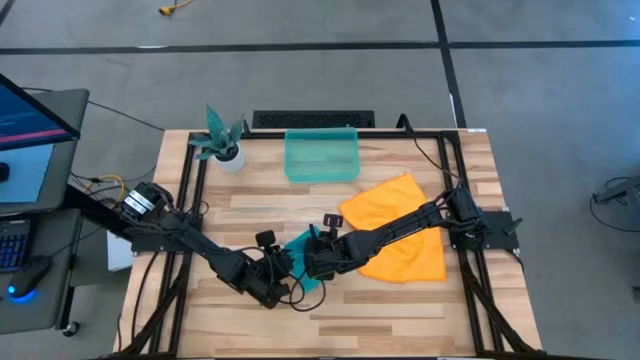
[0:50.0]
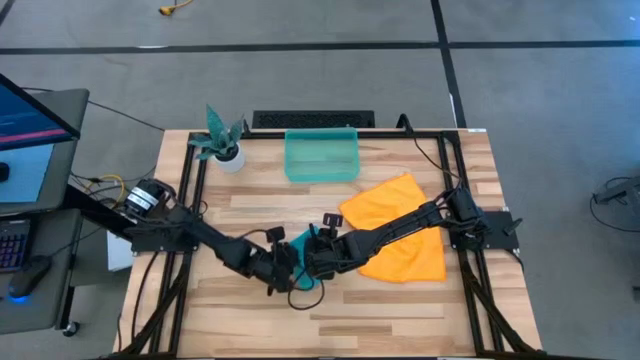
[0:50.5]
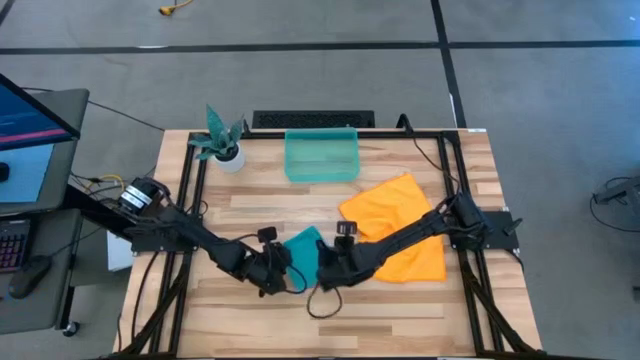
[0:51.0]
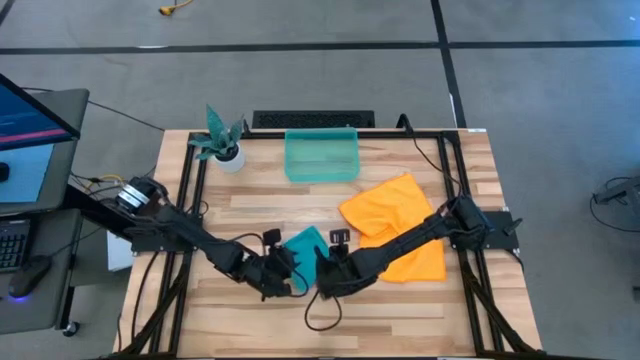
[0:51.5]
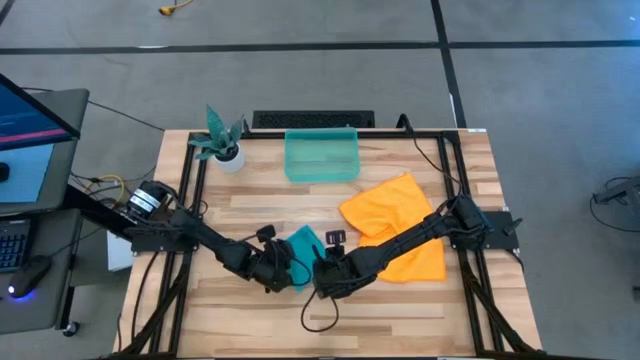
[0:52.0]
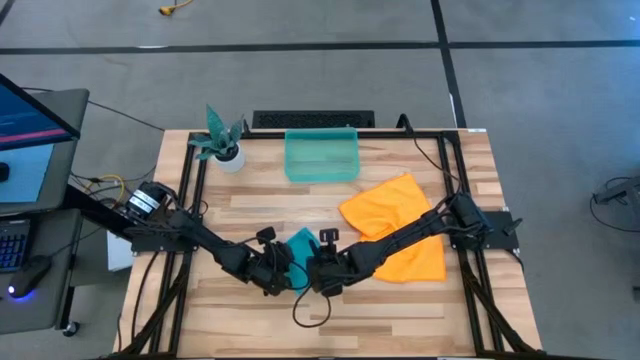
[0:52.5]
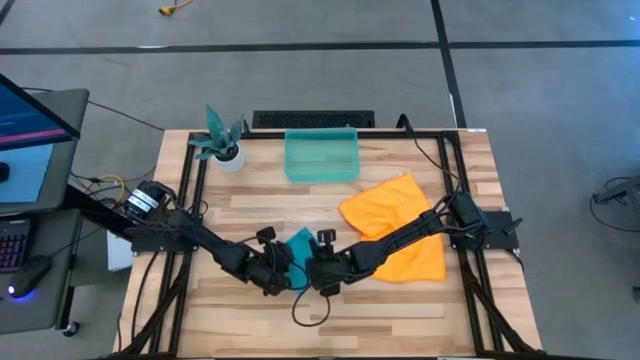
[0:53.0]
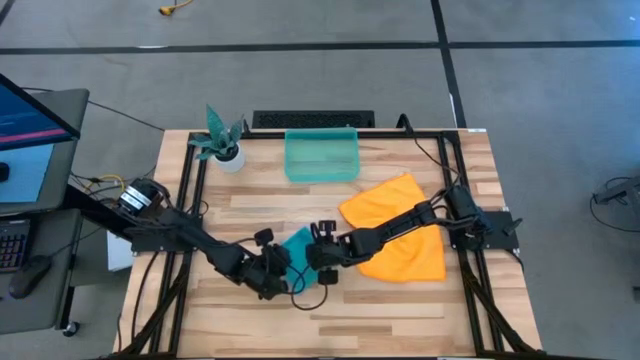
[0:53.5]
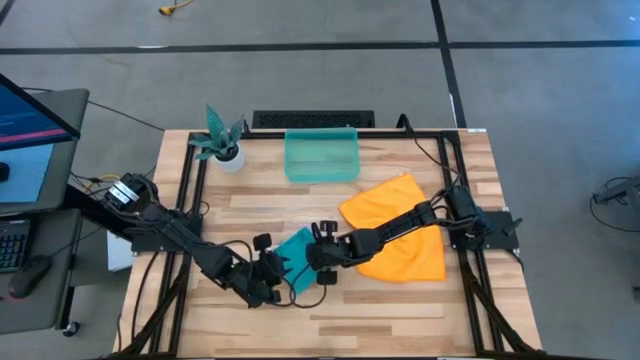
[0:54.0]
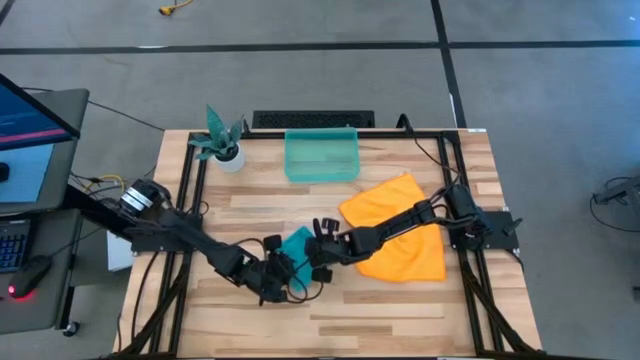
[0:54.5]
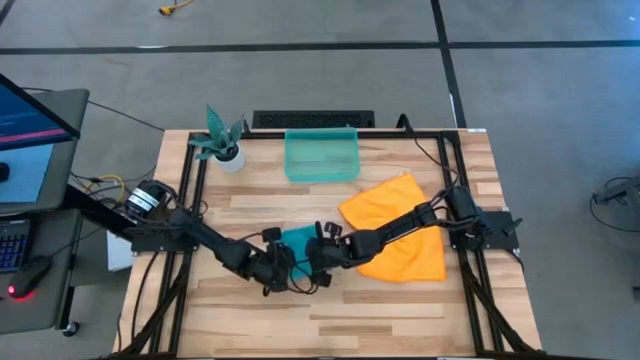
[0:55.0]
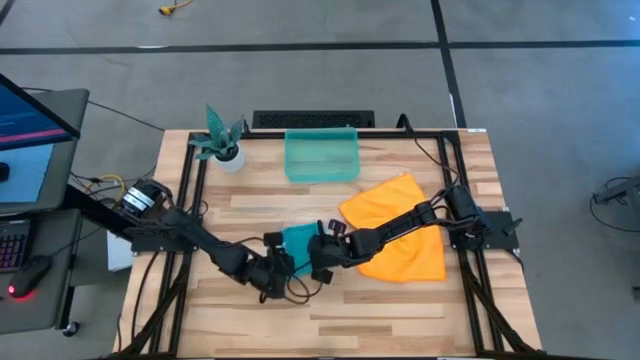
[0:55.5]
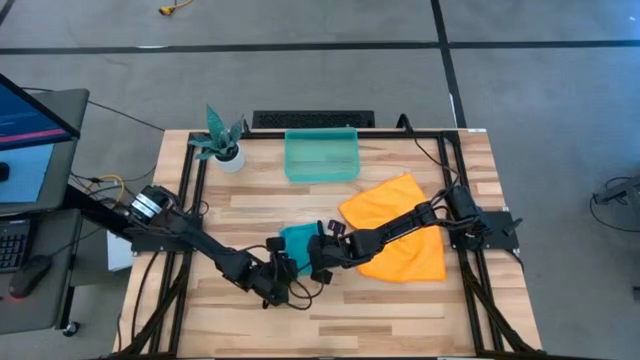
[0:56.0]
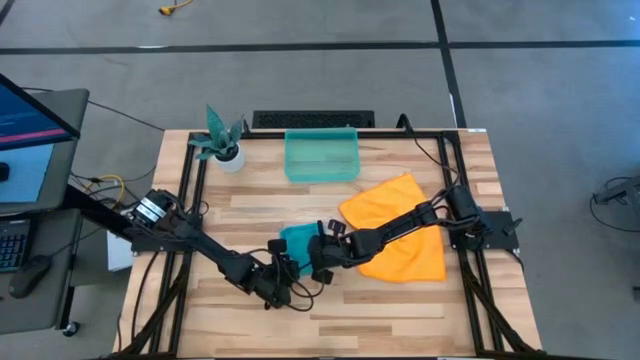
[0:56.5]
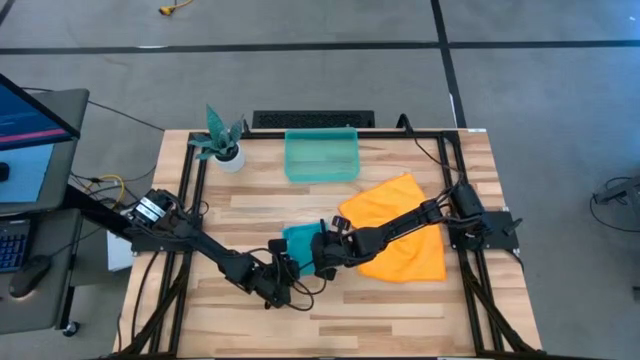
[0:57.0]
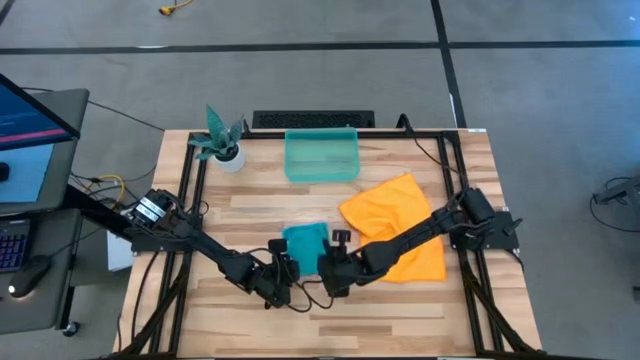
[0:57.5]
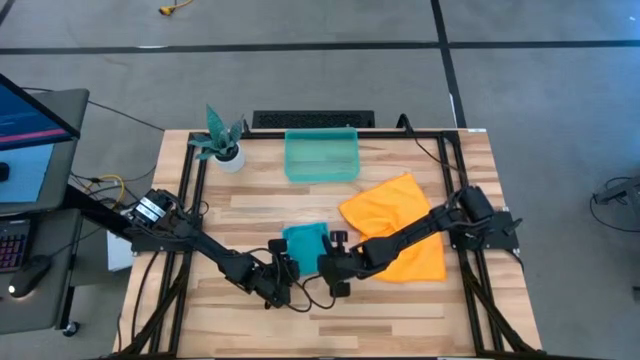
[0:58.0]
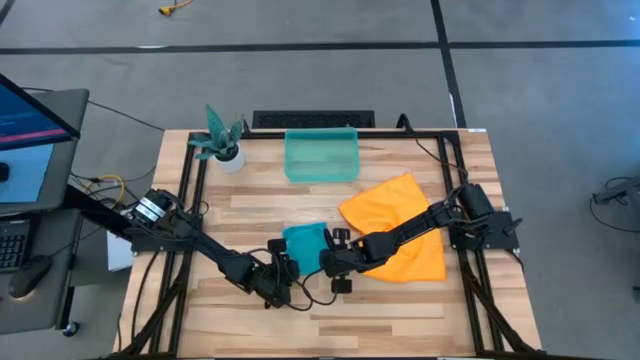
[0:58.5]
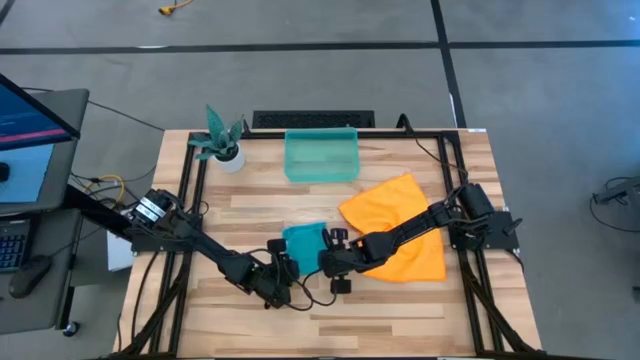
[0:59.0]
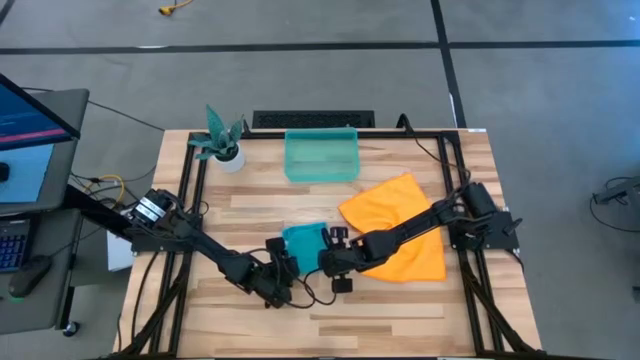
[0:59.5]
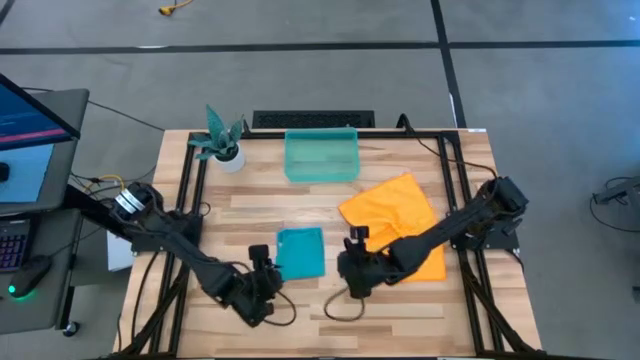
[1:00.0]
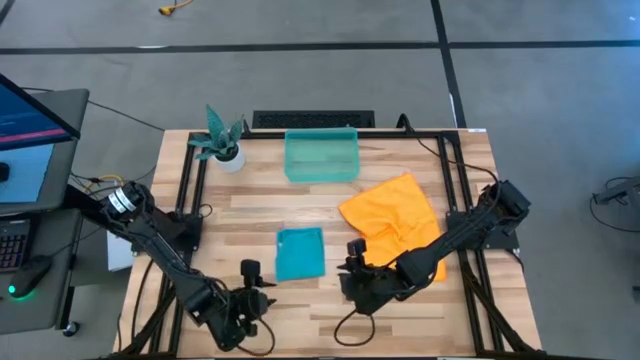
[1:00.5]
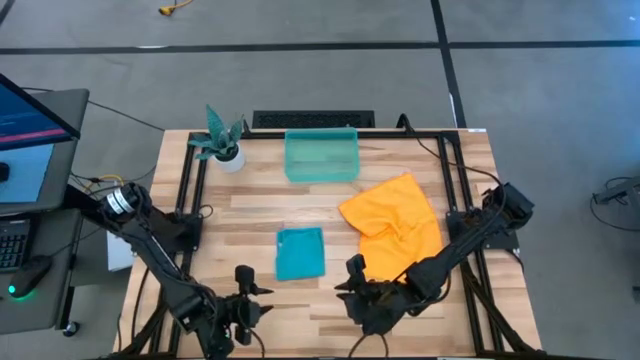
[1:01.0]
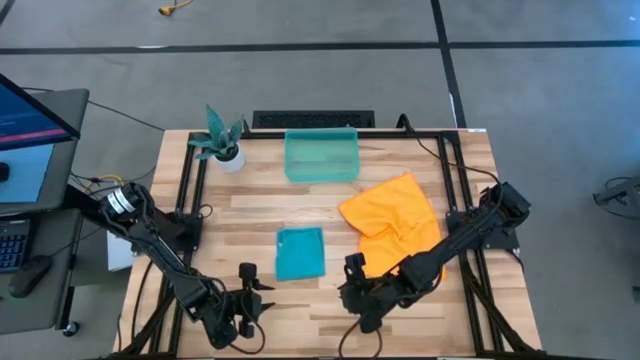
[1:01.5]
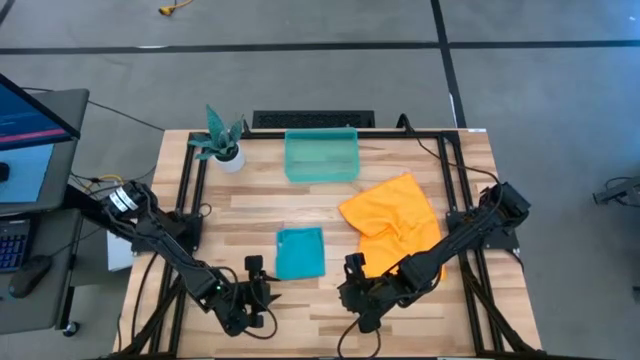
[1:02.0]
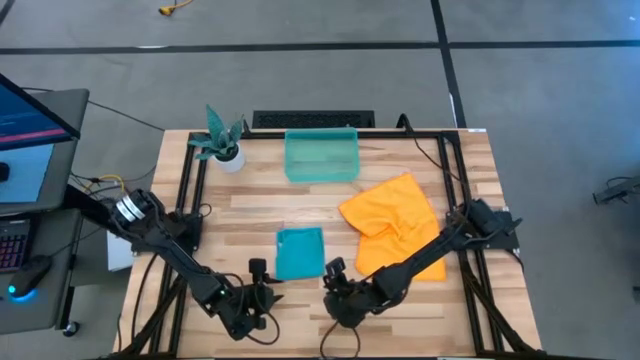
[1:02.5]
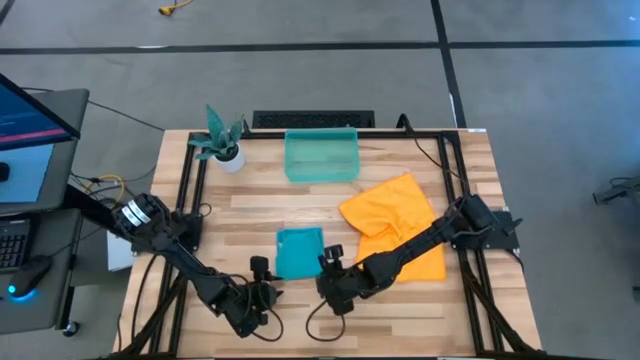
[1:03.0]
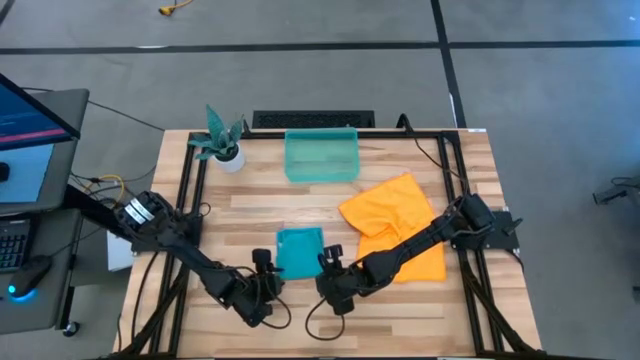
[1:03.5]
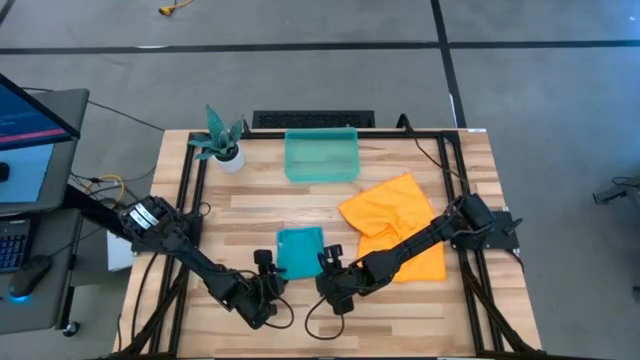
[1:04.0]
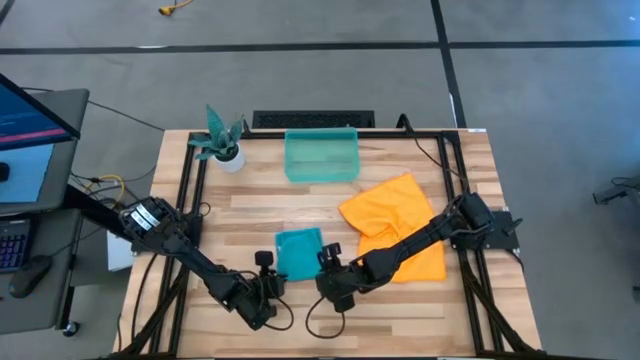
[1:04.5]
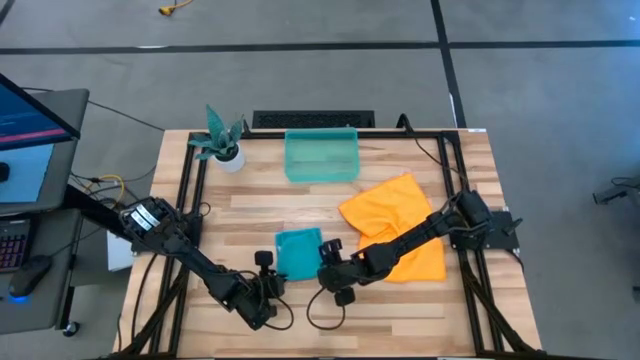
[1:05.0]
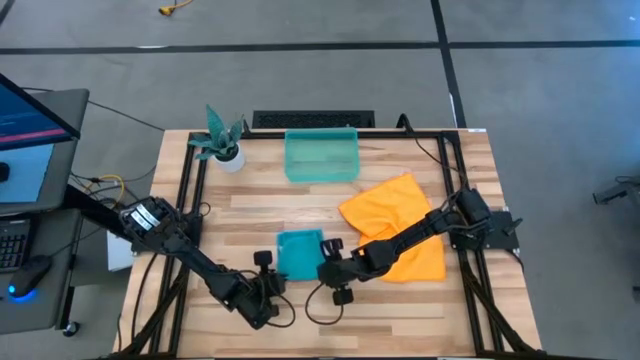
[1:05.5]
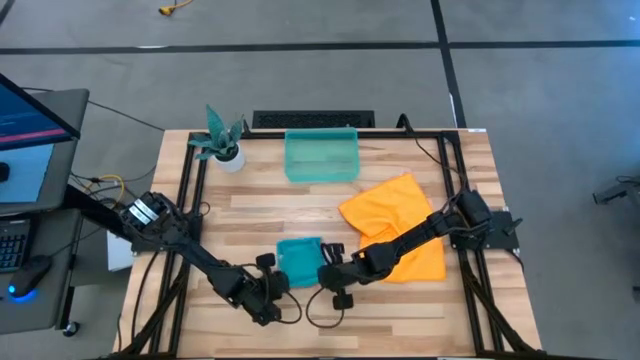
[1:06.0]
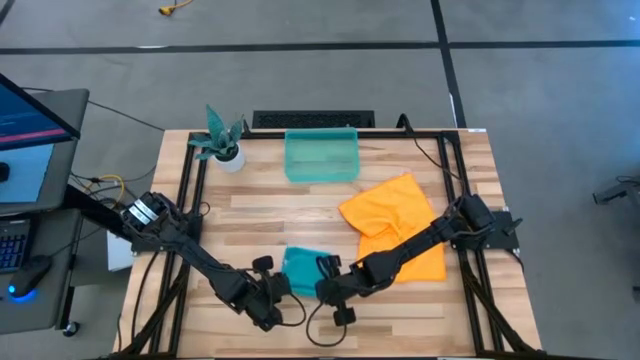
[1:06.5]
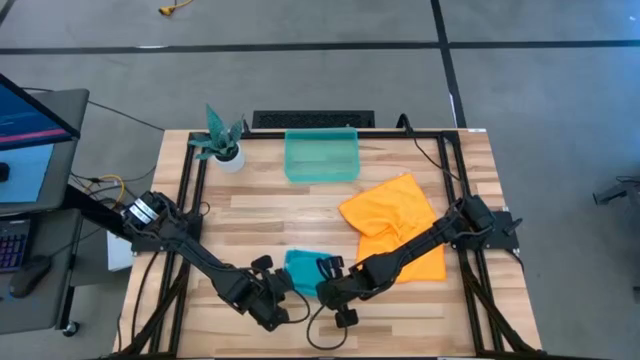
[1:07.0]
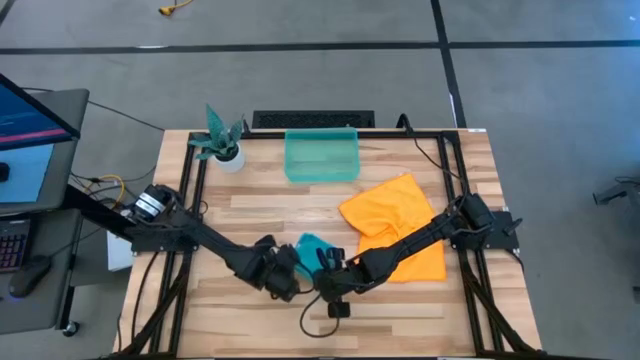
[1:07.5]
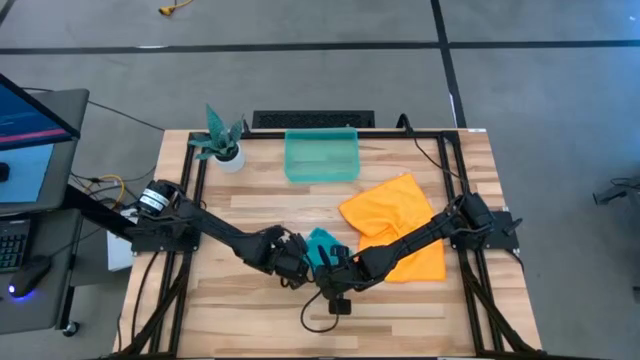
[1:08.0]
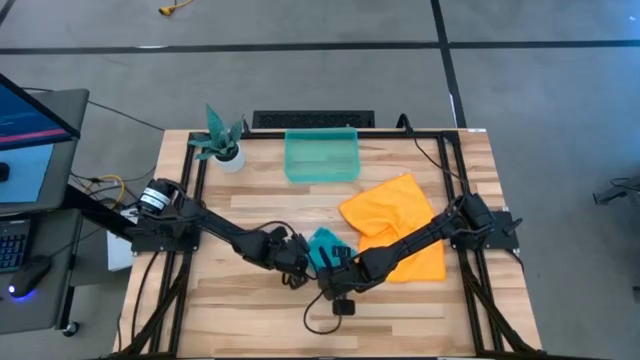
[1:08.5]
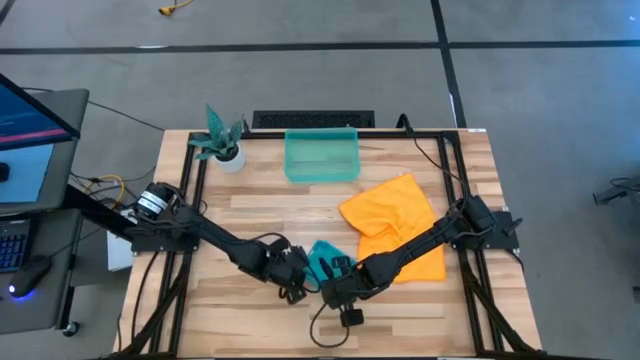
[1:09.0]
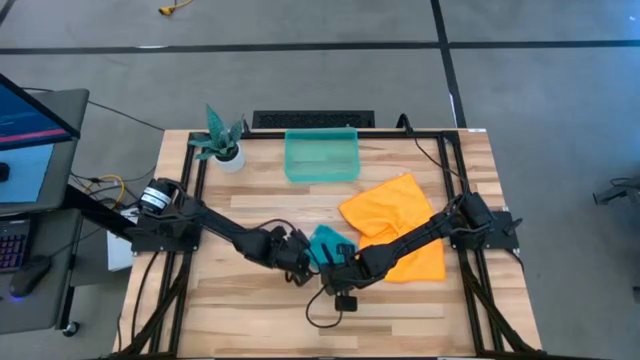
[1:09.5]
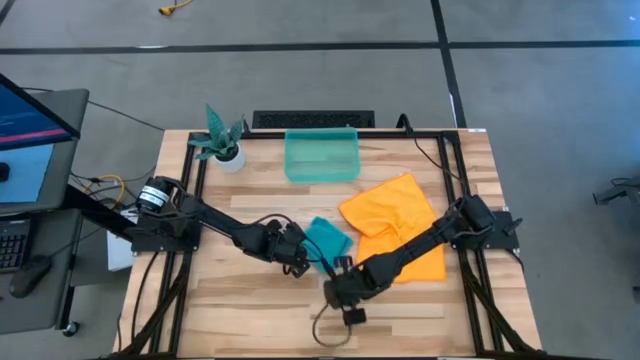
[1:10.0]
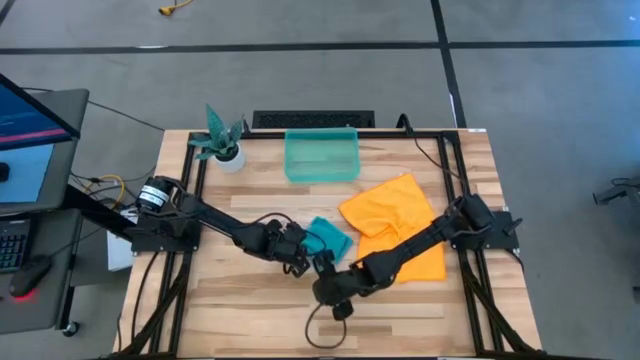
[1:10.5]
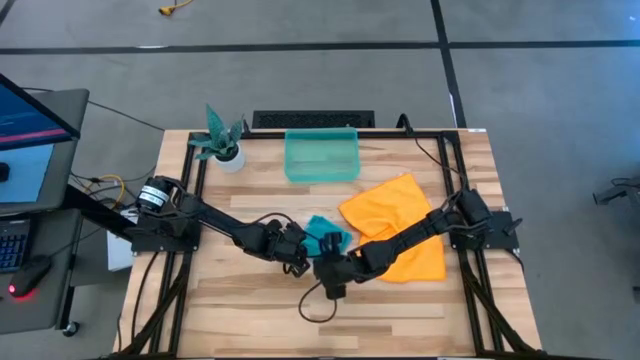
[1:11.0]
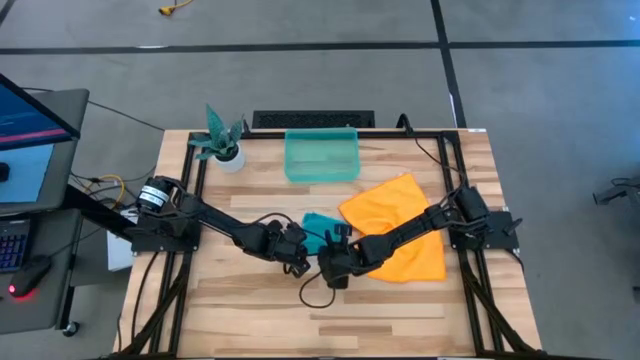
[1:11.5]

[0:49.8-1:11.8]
Task: Roll microfiber towels into tight, uniform cylinder then place into a basket
Roll the blue microfiber cloth
